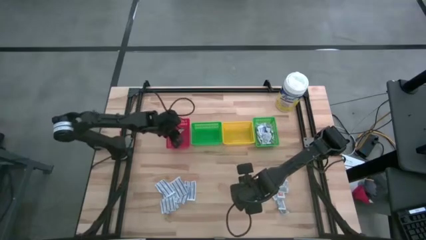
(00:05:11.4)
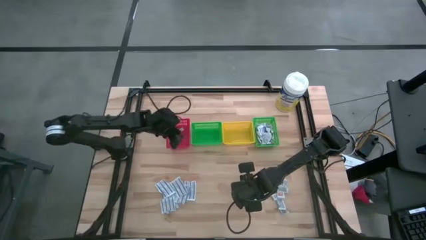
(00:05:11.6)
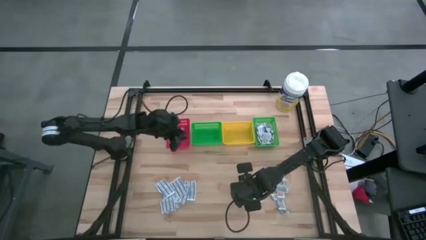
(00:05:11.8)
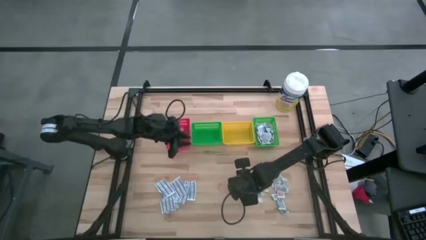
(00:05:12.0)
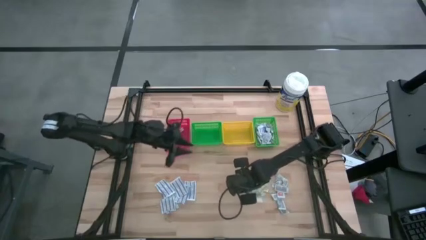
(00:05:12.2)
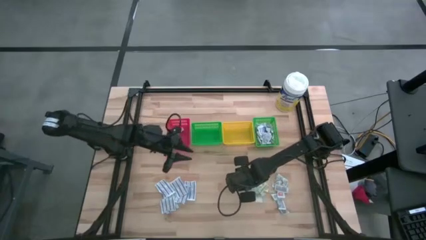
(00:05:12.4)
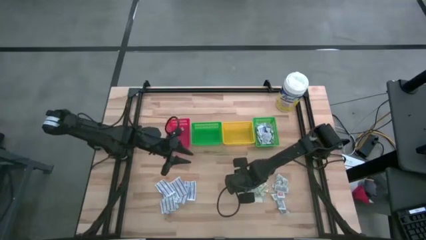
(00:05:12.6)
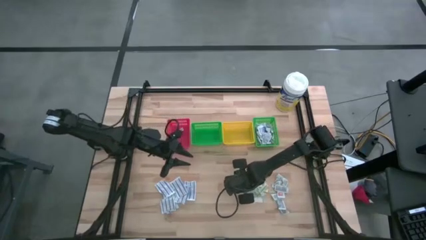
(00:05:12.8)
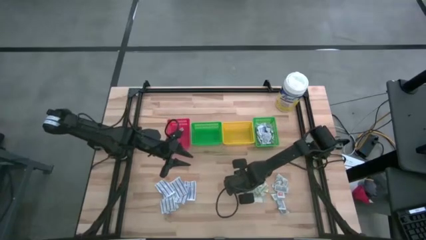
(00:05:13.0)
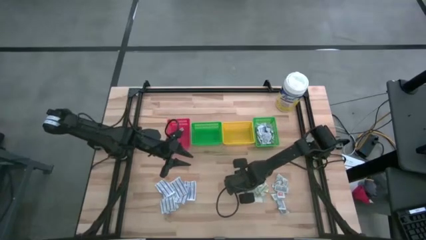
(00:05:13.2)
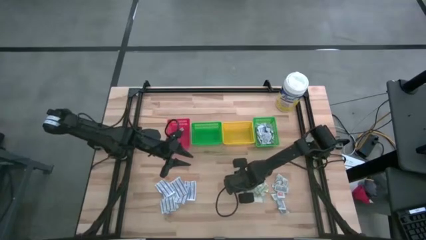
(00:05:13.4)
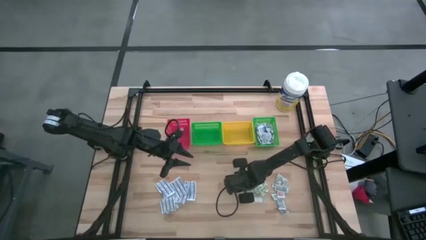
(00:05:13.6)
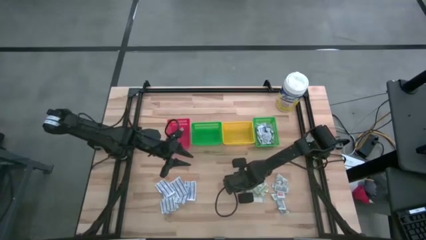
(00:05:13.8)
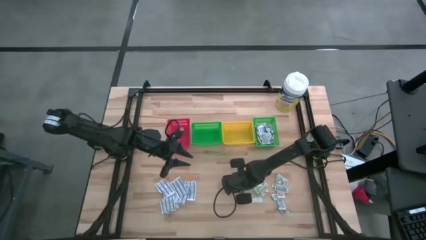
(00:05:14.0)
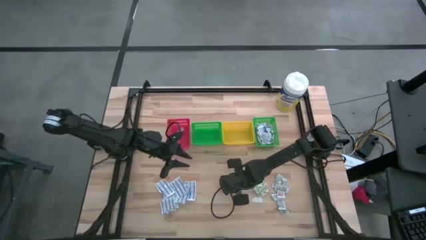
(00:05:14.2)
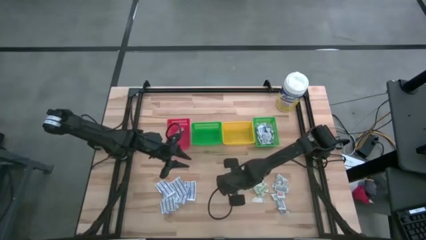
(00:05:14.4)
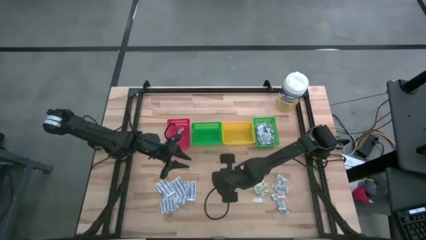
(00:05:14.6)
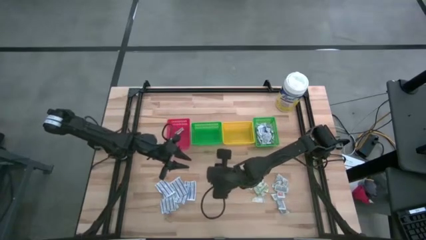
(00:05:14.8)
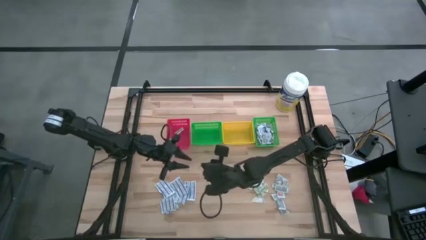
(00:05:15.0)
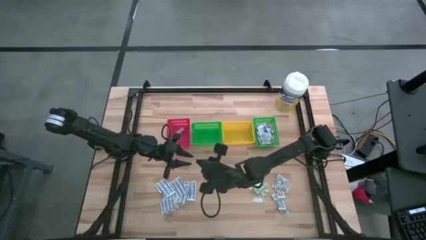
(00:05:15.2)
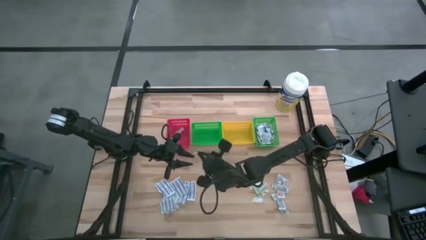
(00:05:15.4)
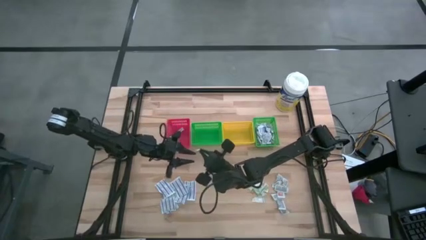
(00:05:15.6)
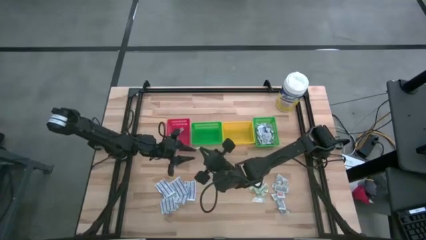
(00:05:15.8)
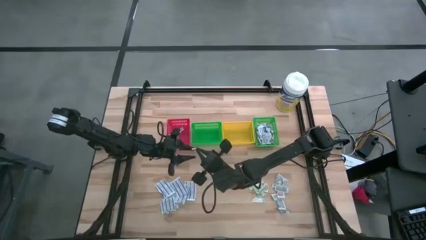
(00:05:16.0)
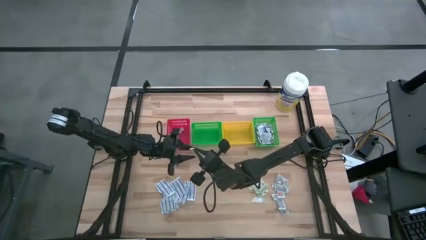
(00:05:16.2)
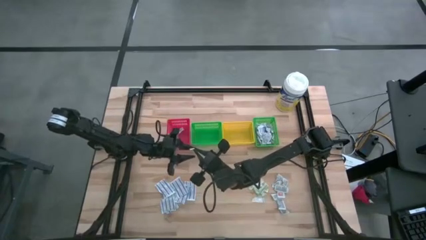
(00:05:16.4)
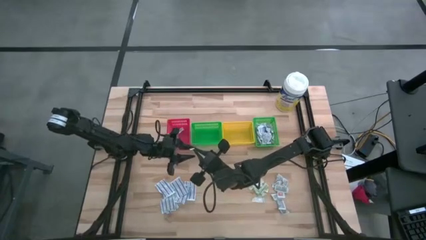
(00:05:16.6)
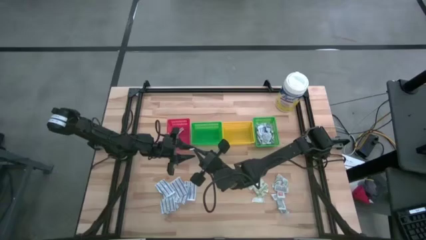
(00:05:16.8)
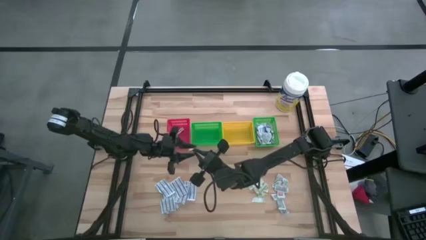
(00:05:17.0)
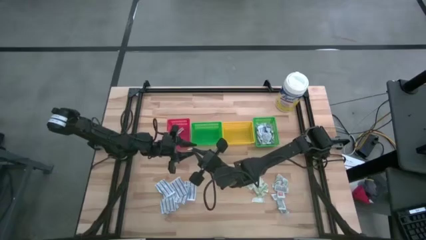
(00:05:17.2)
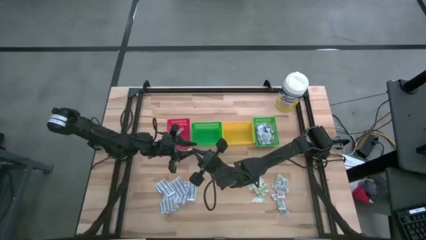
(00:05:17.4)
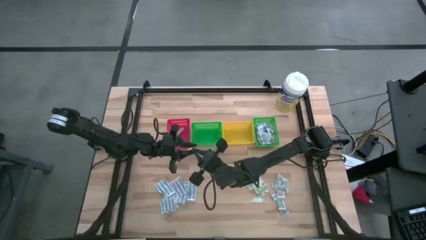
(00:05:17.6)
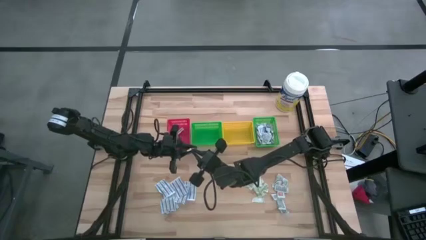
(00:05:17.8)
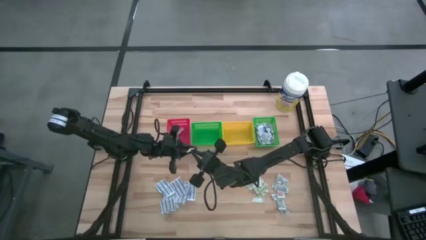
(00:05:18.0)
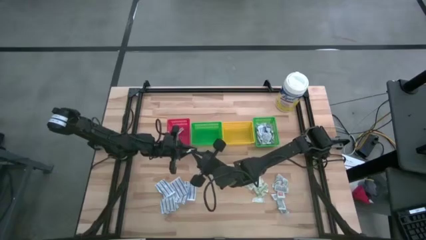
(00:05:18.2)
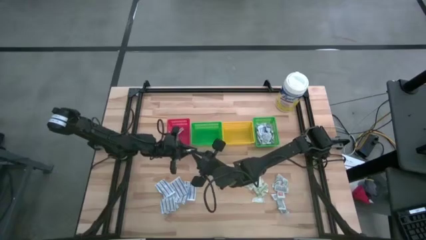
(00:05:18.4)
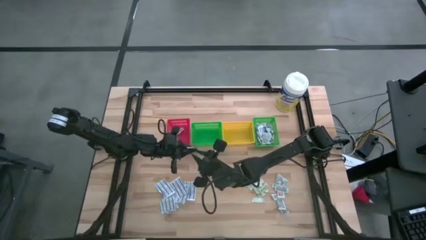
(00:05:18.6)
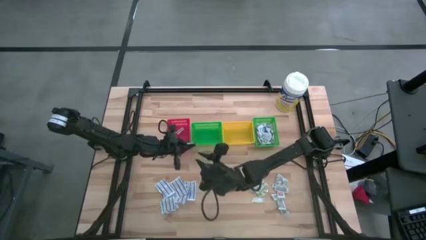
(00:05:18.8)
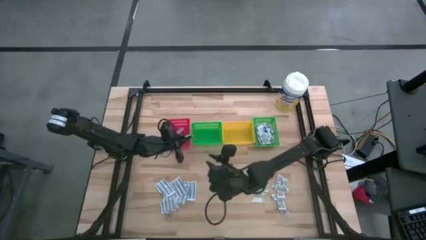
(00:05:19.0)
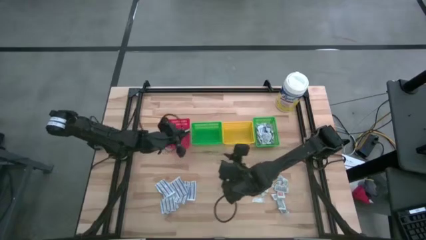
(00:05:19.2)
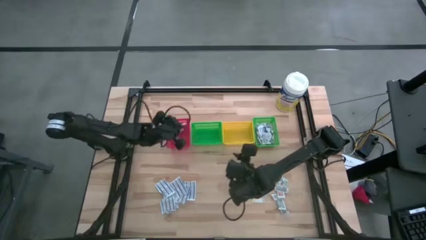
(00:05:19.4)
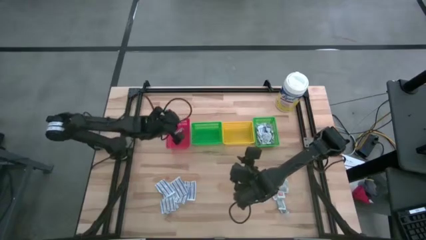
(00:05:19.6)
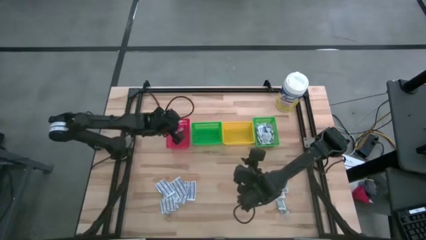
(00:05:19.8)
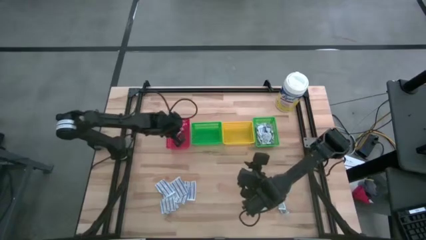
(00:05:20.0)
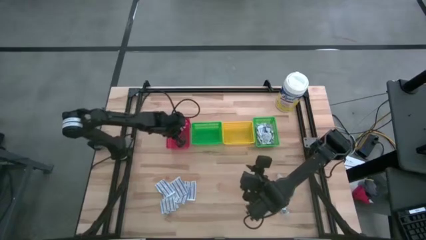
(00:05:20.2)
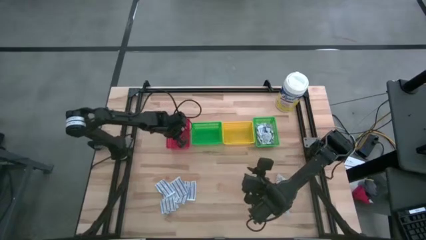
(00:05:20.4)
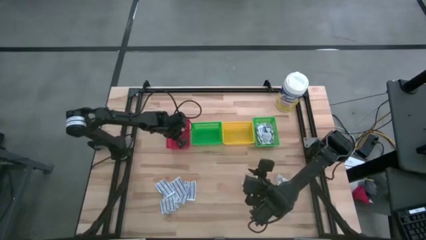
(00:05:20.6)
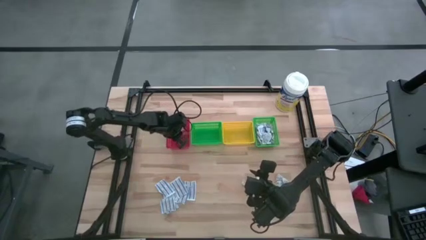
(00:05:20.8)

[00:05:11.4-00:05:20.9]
Task: Pick & Place First Aid Supplies
Put the green bandage into the red bin

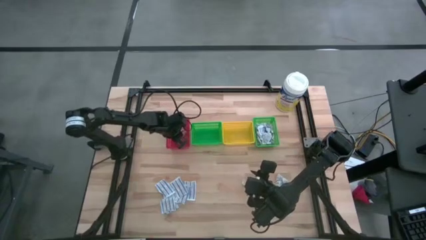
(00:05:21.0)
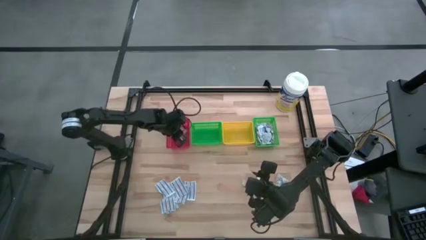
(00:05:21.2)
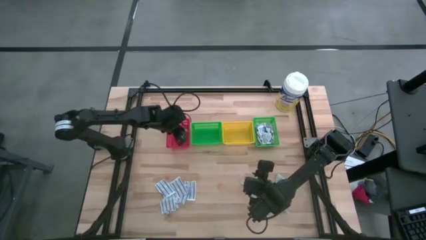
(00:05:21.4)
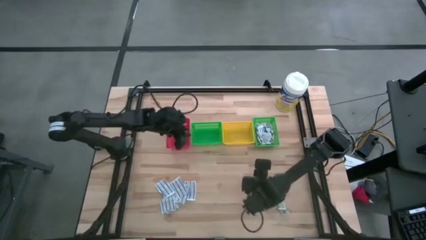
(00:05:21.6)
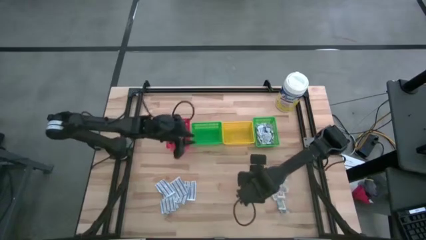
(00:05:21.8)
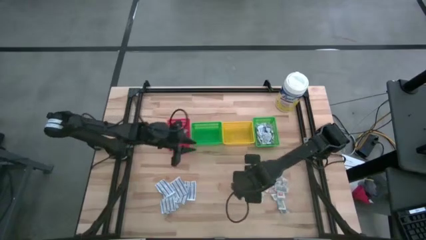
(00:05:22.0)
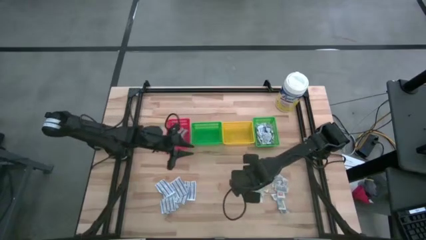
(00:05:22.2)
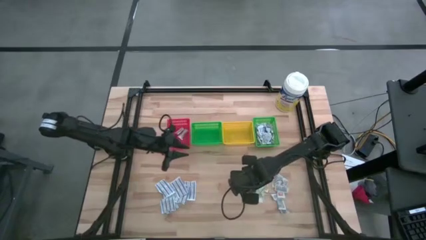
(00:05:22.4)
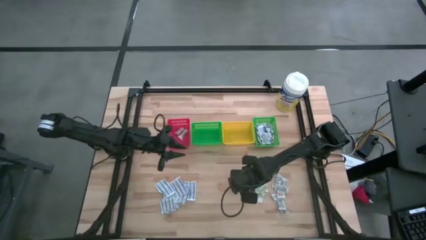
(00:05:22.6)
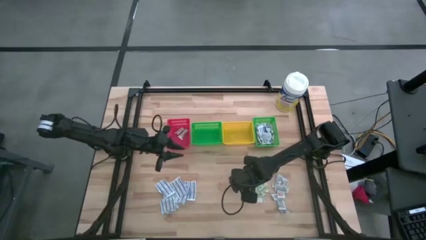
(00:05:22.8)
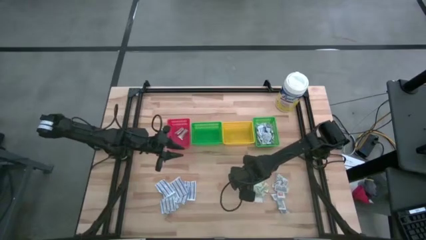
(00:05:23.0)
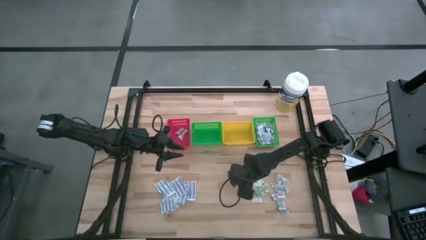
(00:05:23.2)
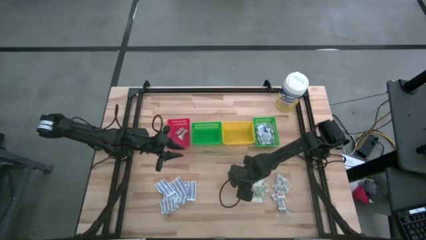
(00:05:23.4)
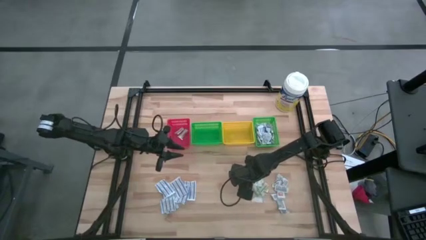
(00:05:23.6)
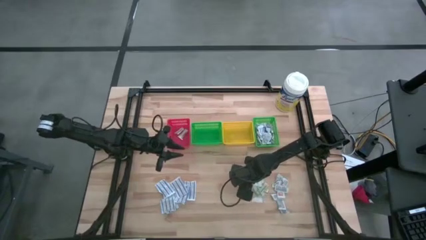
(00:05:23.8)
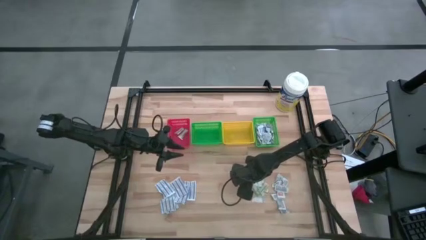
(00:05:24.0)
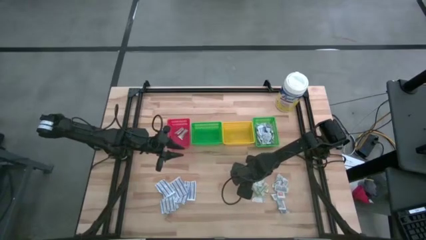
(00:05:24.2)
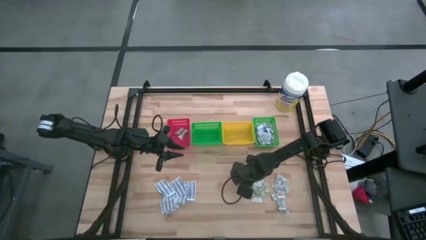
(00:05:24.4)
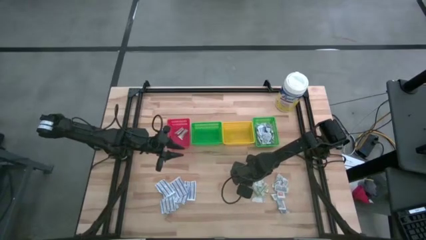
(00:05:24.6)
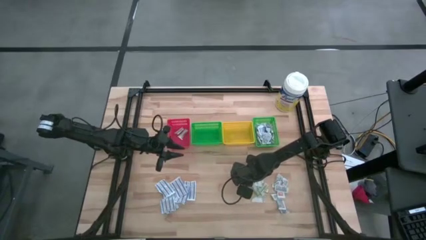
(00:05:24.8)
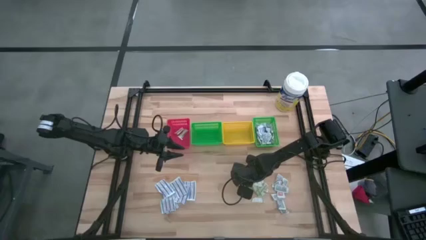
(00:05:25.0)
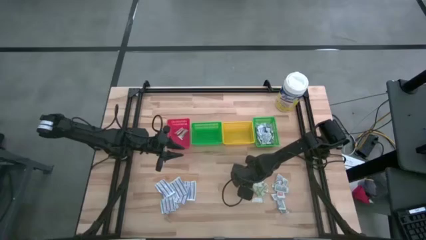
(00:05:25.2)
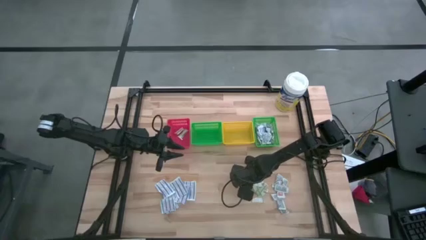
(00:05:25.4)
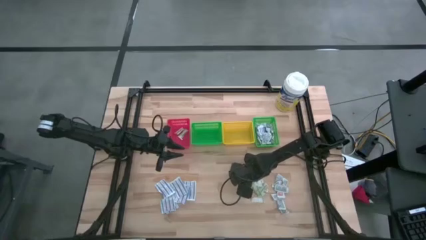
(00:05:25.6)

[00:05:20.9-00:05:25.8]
Put the green bandage into the red bin
